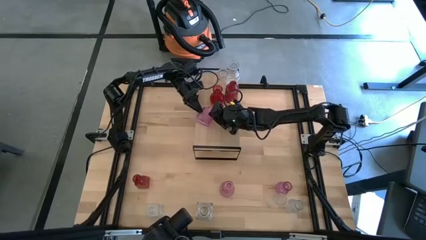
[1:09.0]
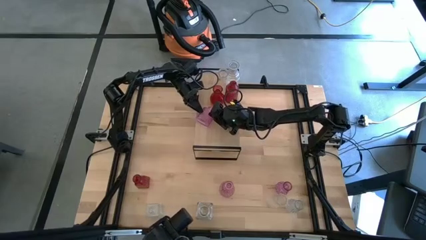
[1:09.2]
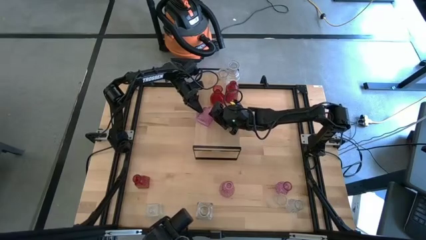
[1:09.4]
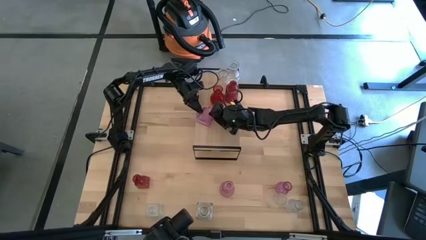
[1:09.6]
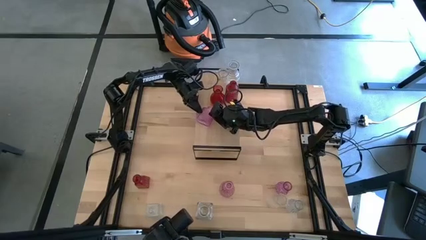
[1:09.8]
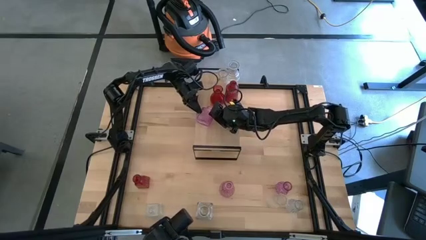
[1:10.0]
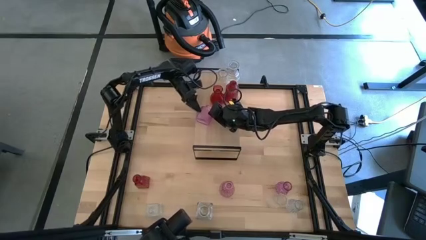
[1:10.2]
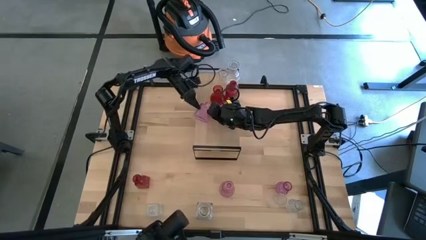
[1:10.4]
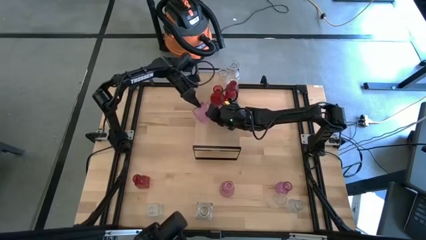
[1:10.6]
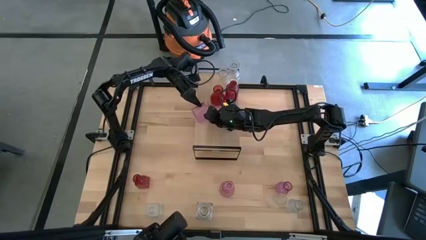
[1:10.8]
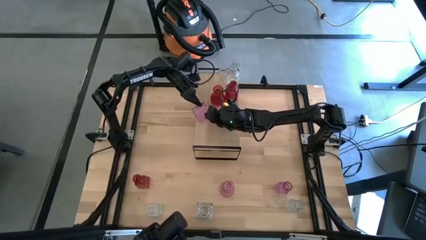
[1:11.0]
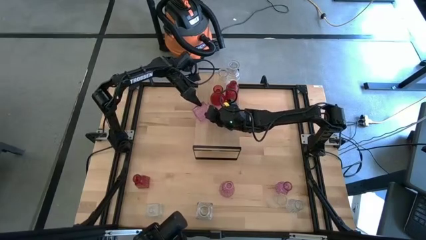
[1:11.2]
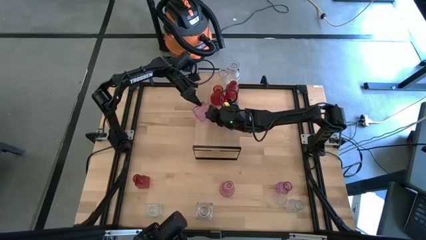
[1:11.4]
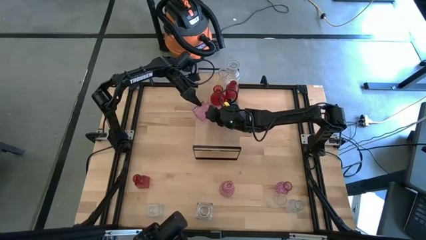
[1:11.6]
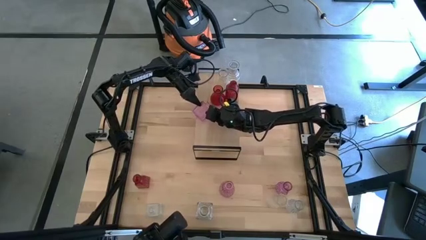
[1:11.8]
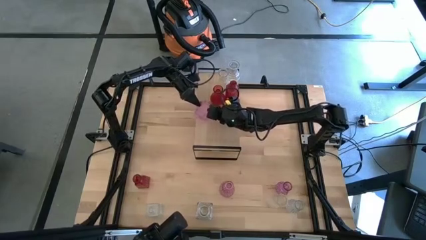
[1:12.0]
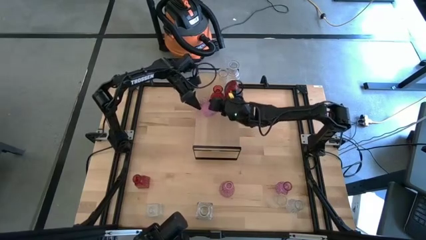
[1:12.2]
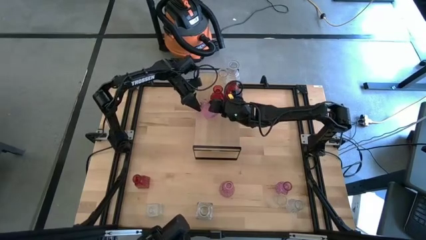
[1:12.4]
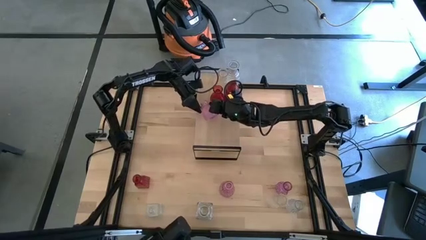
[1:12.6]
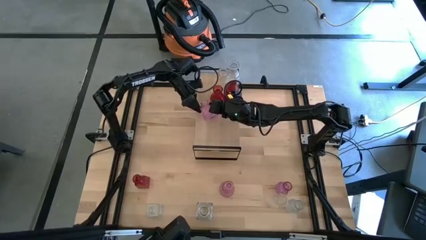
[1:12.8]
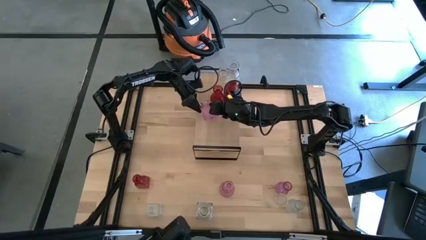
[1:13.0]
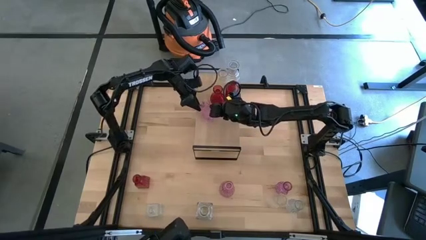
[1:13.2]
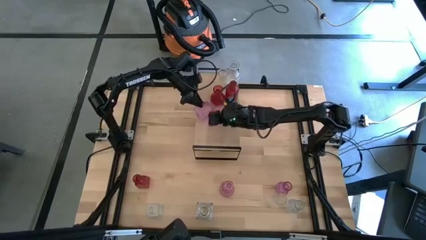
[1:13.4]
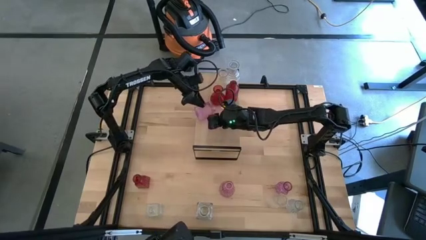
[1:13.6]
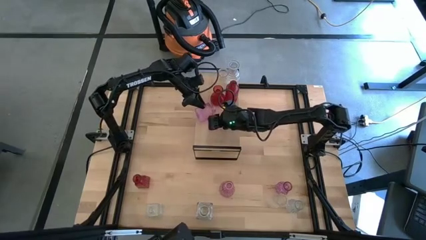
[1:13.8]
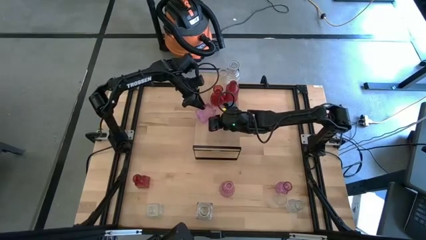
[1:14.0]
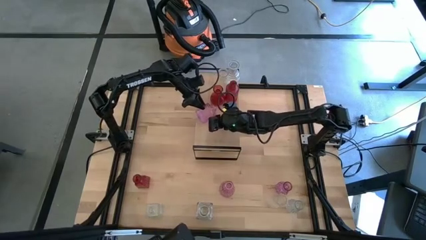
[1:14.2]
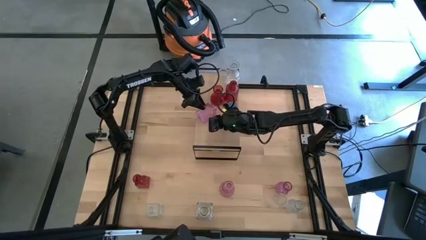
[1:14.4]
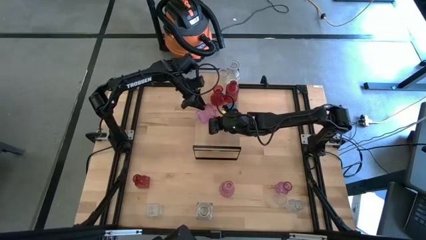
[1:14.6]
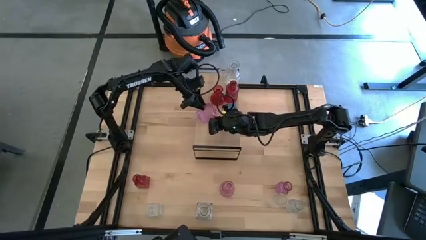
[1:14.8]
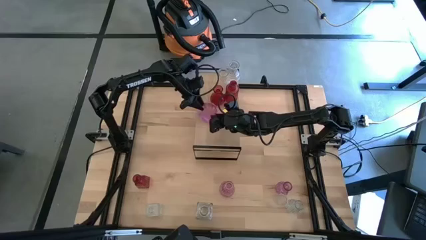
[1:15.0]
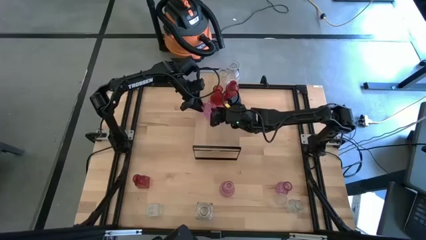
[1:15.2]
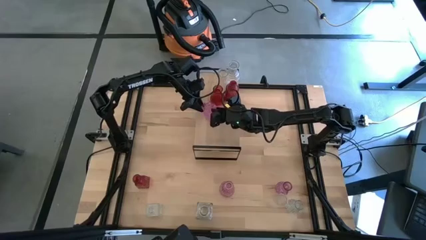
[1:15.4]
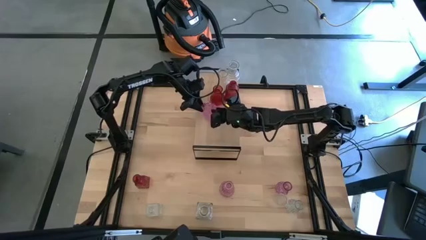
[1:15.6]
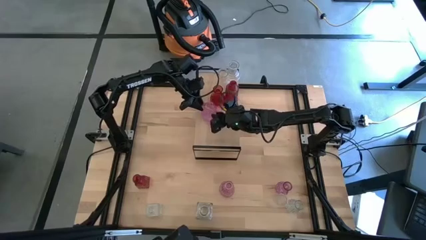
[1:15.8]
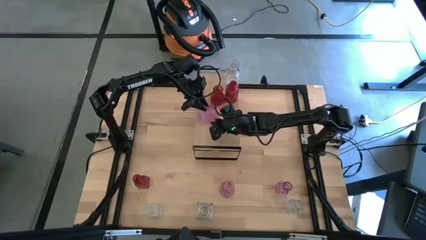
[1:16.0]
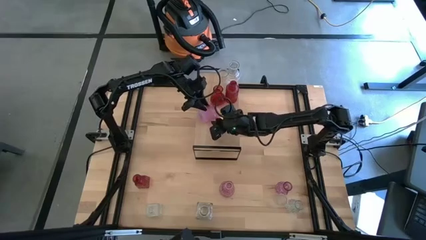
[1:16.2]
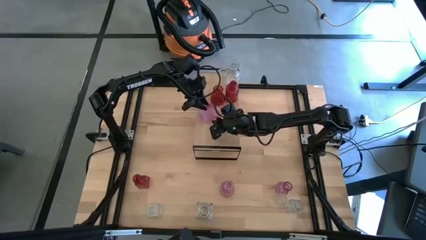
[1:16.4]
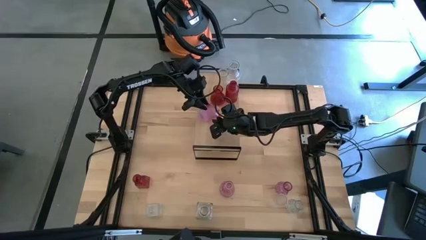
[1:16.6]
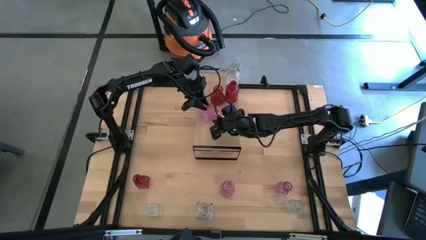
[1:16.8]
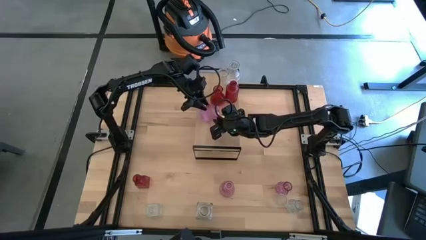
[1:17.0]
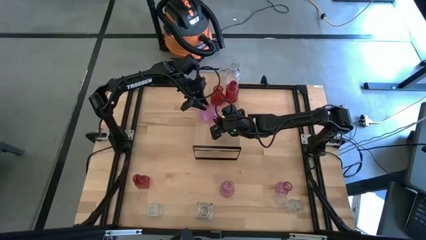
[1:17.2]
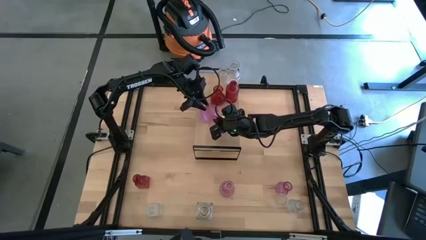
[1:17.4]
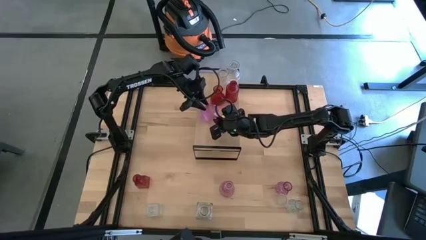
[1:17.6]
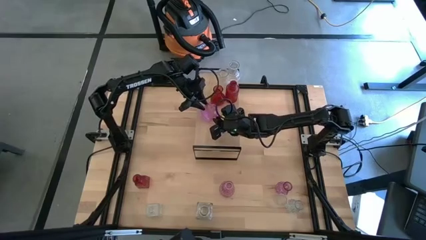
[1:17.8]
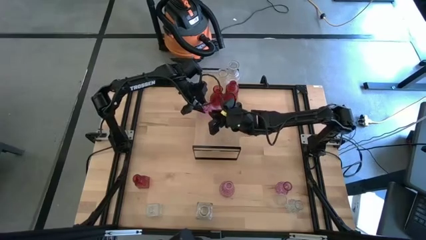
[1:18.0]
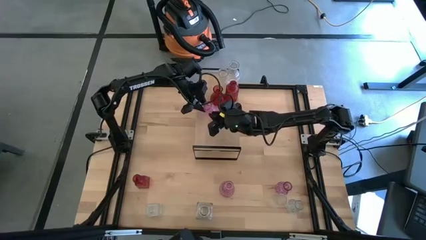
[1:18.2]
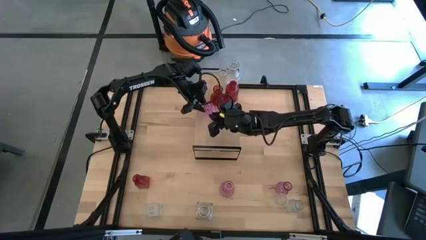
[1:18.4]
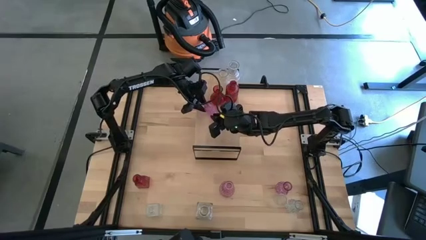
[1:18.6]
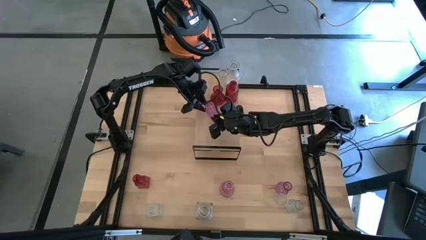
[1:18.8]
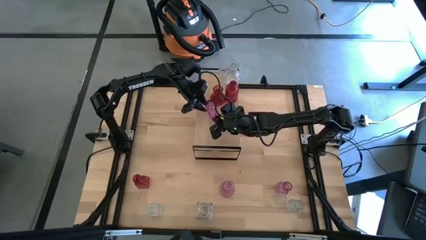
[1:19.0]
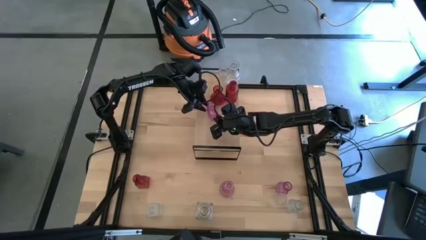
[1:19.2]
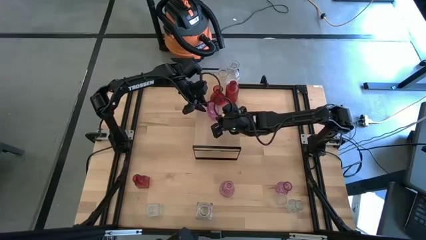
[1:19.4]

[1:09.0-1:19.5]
Task: sort vases onto shelf
Put the purple vase on the shelf

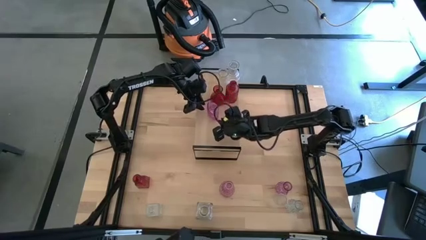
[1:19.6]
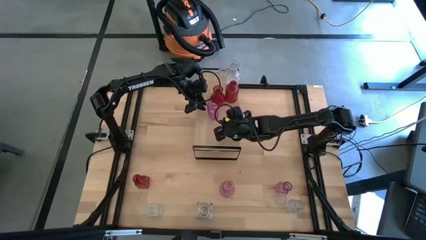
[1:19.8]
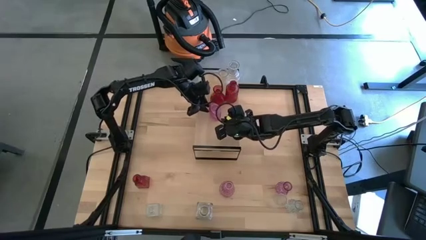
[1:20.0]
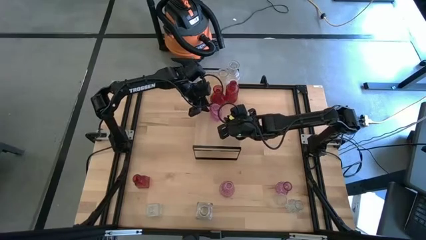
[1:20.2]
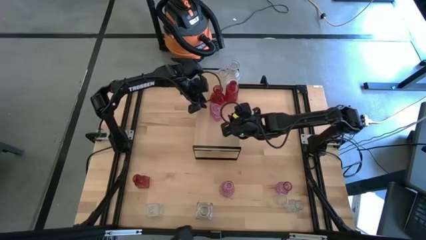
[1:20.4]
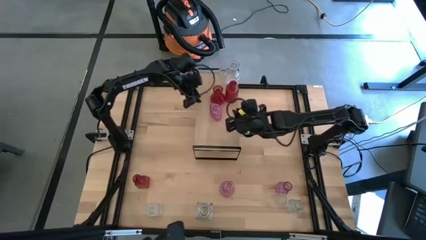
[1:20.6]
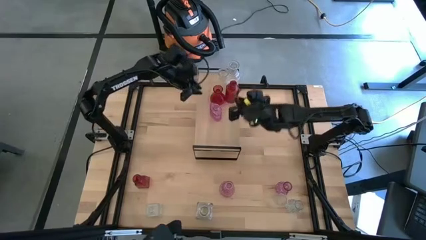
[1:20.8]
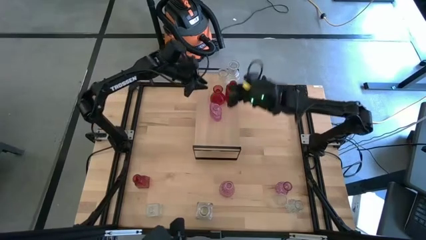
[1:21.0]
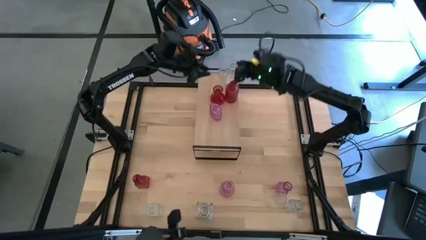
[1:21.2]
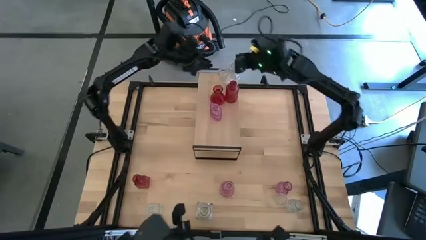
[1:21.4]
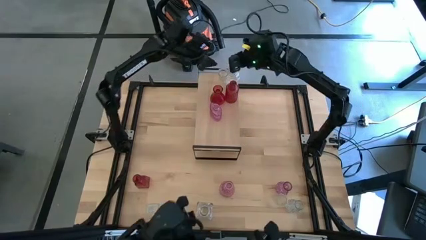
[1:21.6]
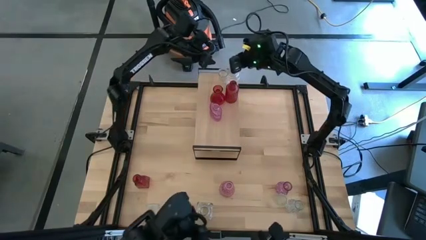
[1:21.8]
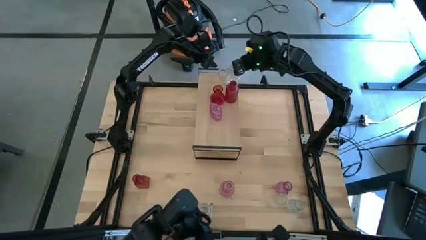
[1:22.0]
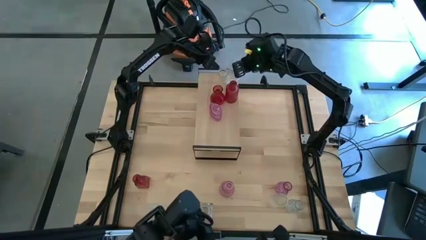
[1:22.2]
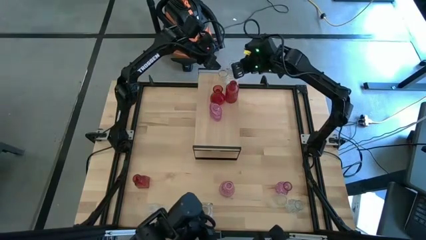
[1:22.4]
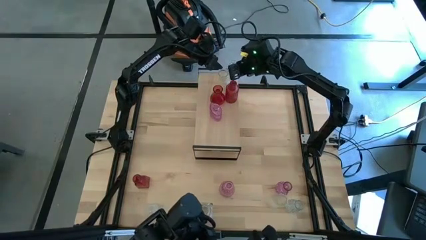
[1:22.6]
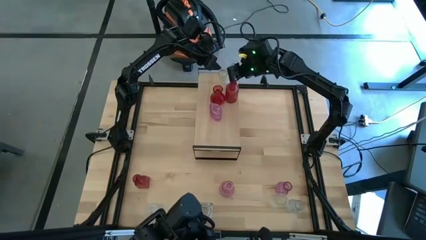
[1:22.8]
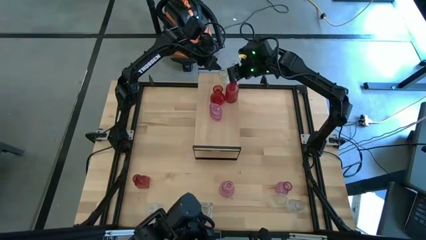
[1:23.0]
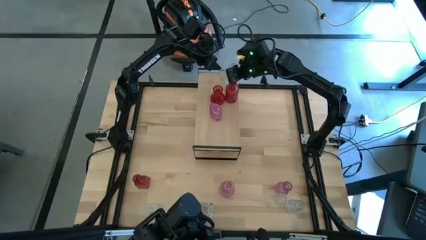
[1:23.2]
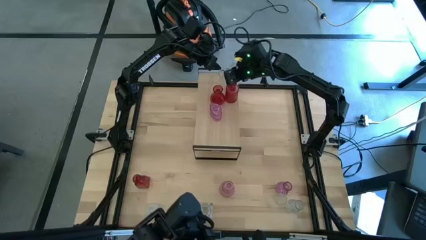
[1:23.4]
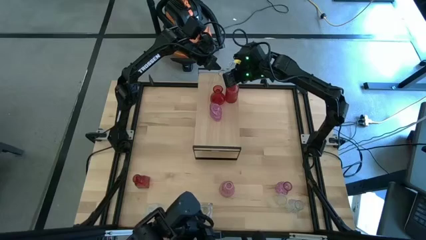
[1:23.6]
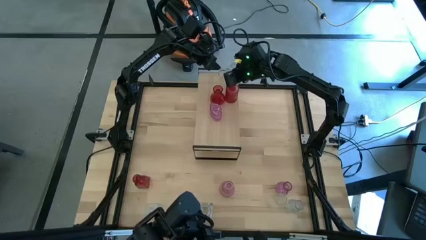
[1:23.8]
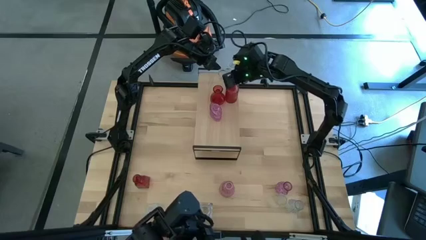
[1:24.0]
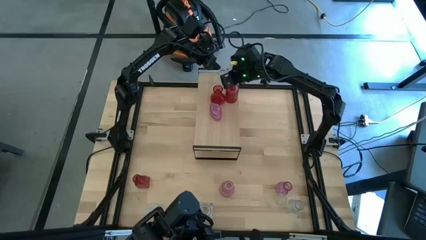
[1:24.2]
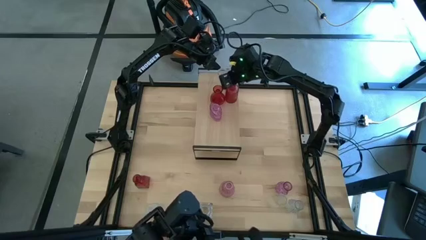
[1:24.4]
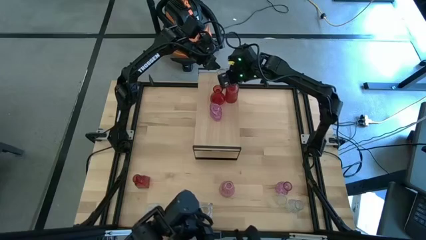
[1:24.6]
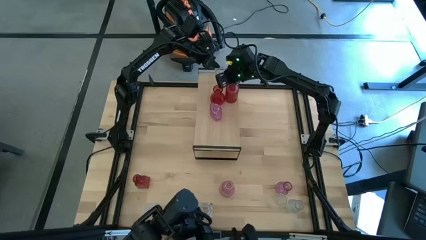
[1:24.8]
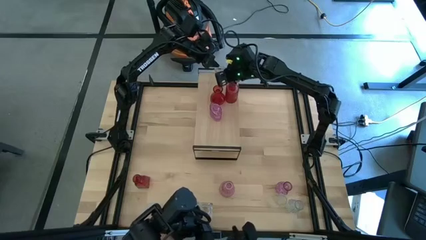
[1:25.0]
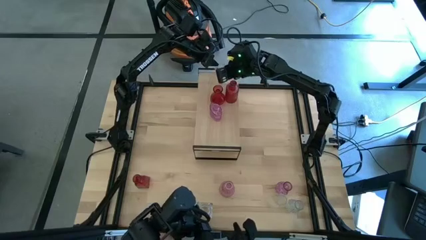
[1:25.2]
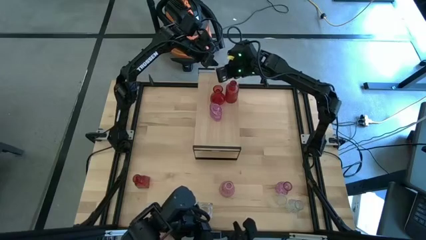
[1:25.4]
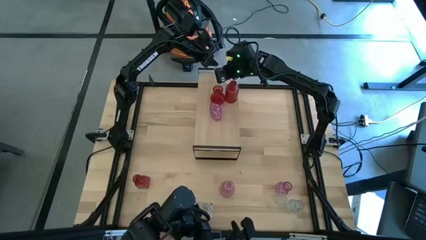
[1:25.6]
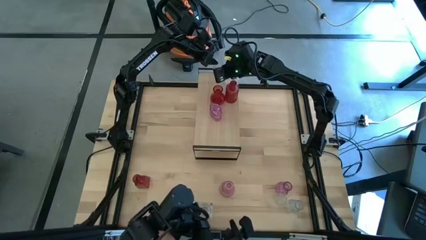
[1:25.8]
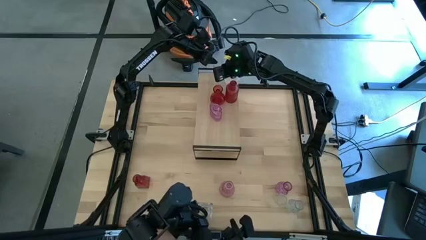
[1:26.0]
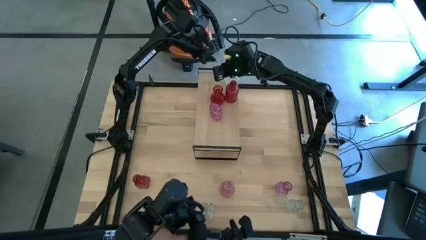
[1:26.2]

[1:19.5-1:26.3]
Adjust the transparent vase on the shelf
